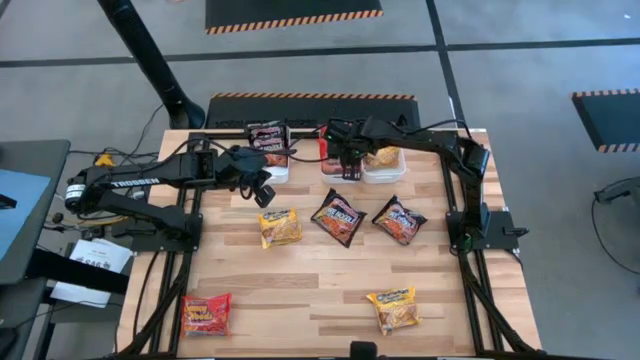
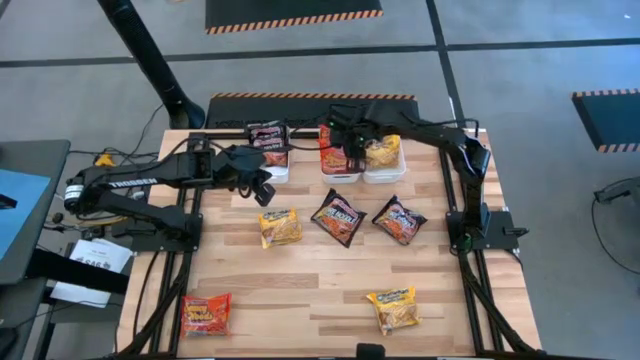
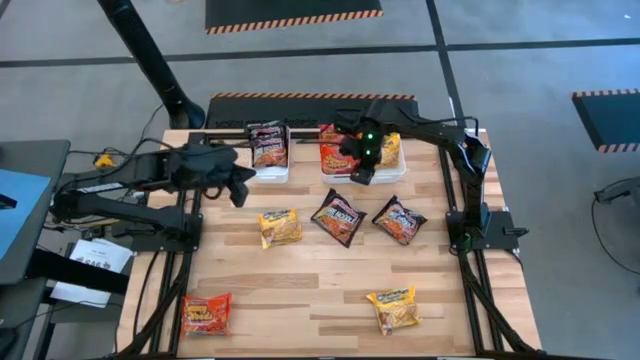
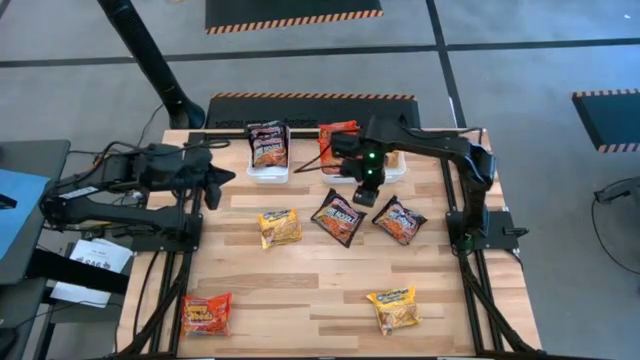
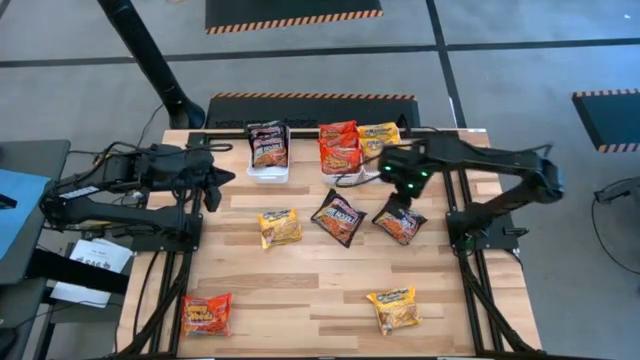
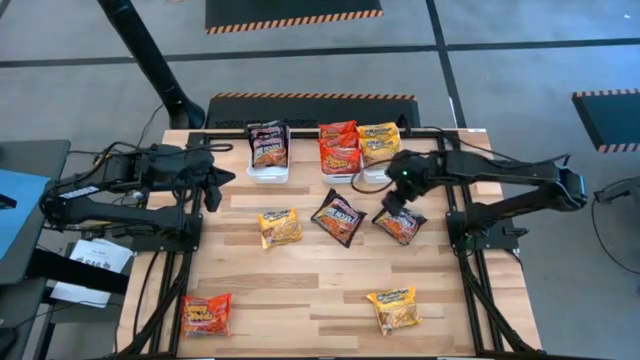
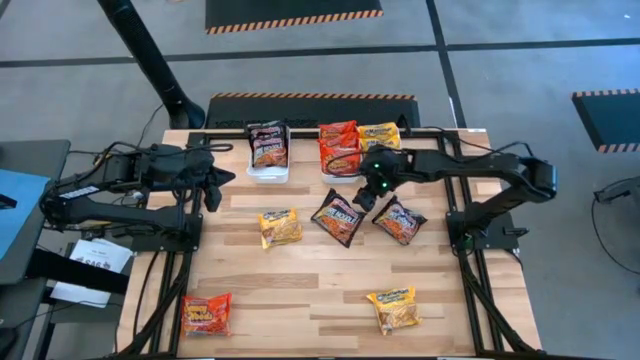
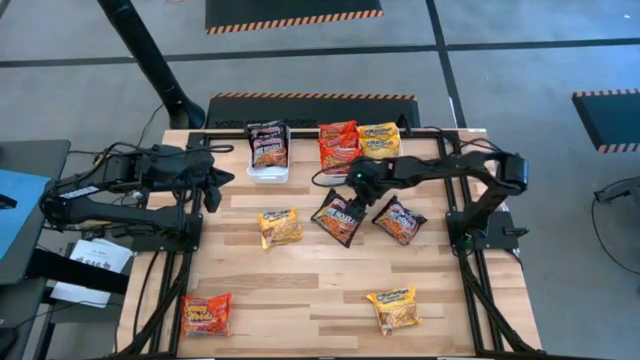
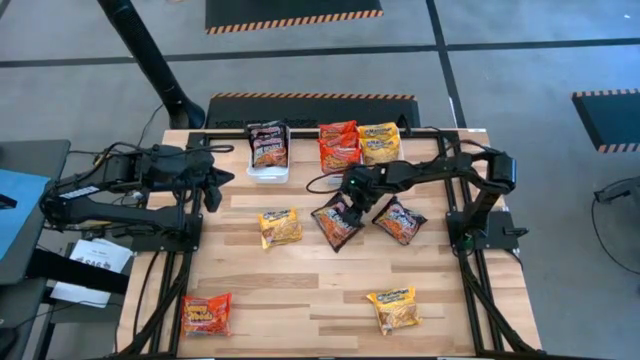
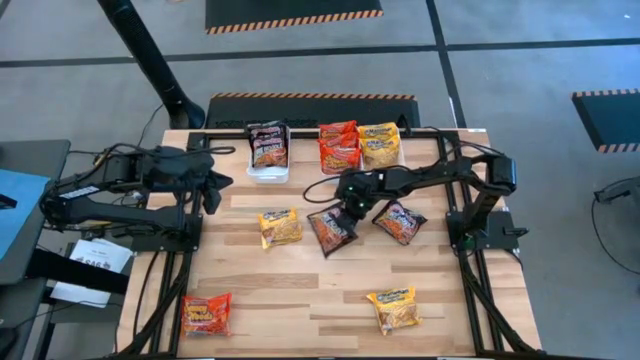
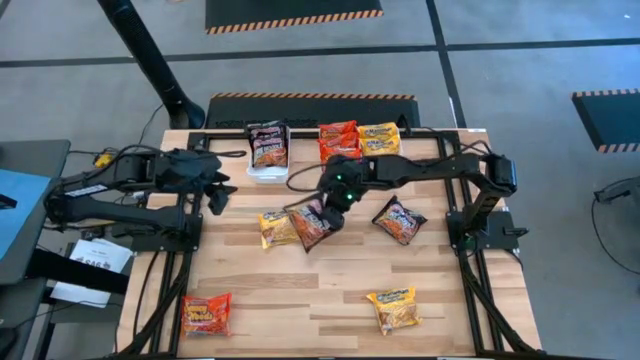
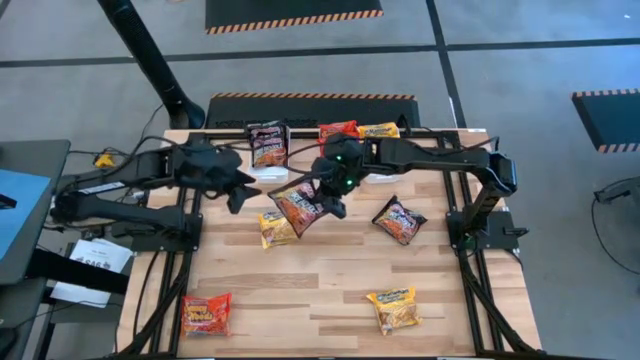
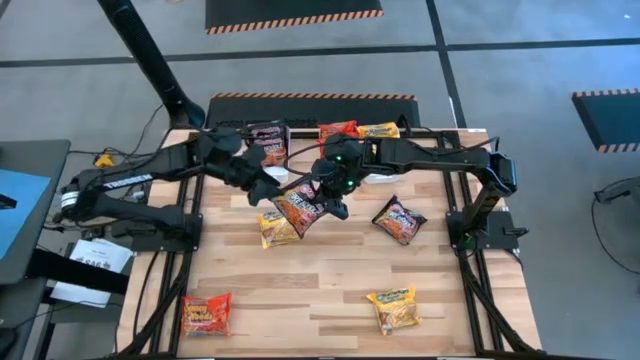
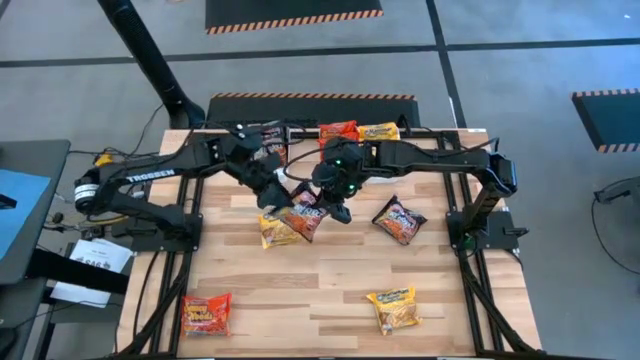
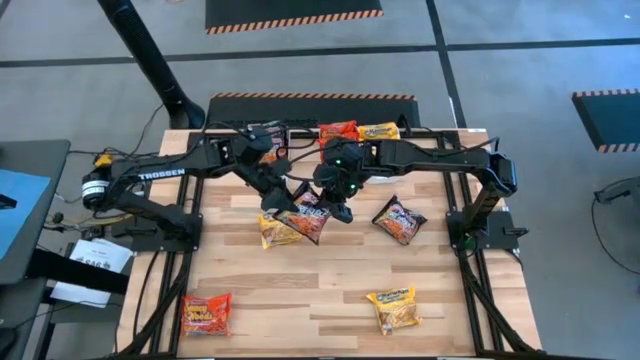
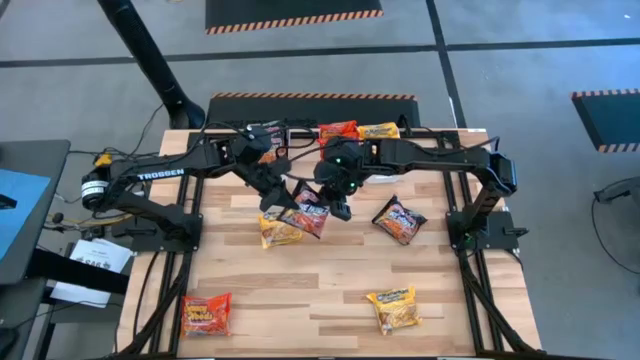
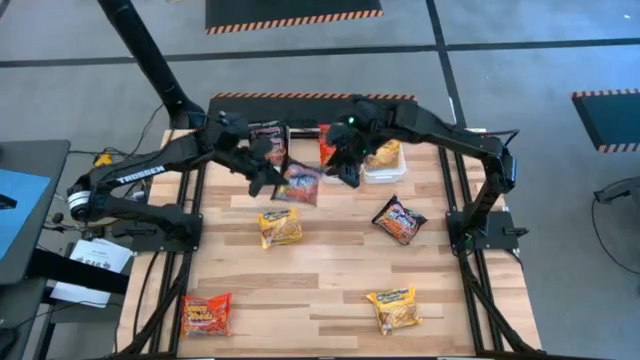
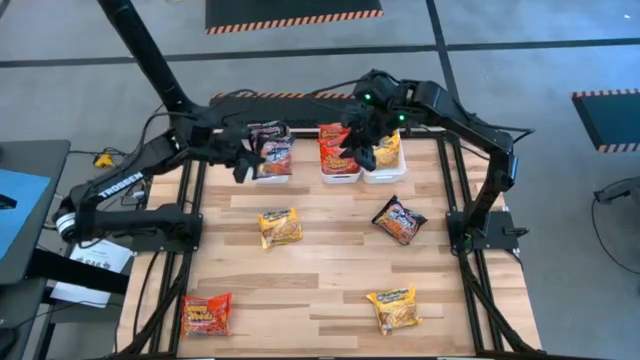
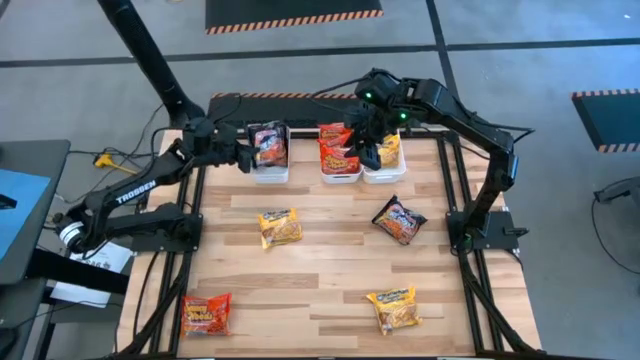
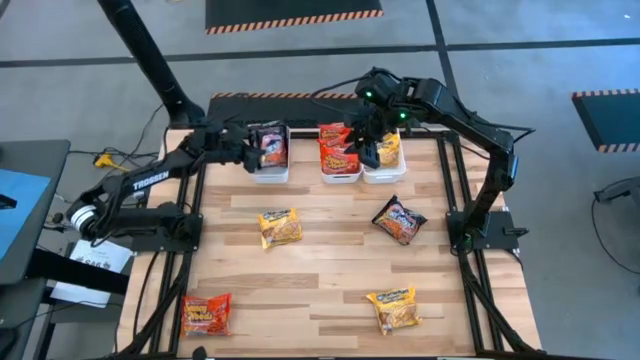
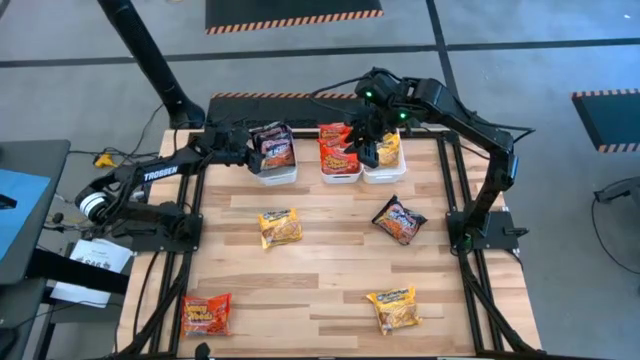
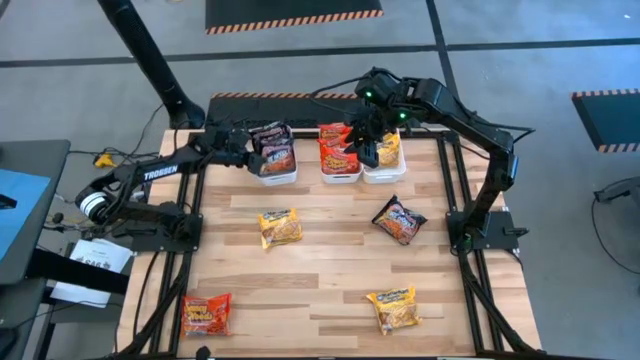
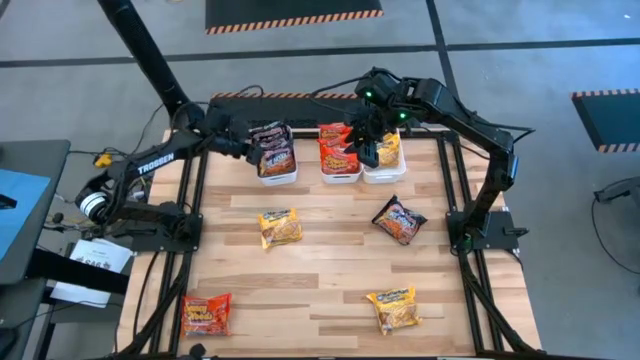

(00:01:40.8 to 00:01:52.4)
Task: Sort Maruchan noodles
Put the black noodle pack into the left white bin

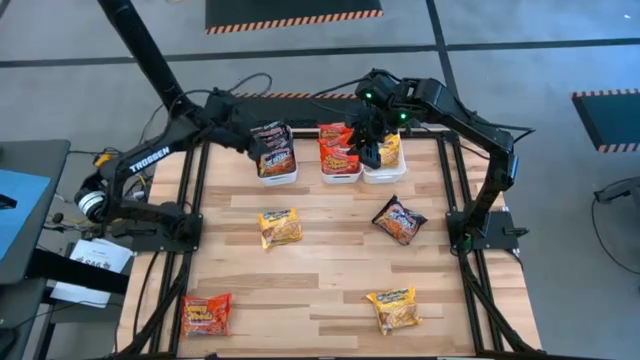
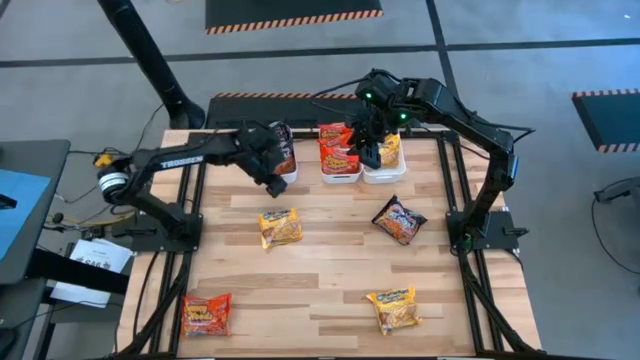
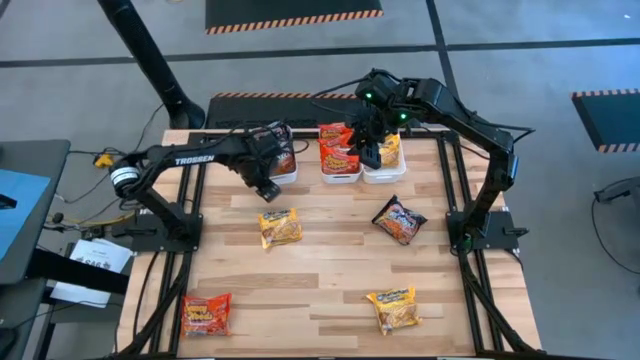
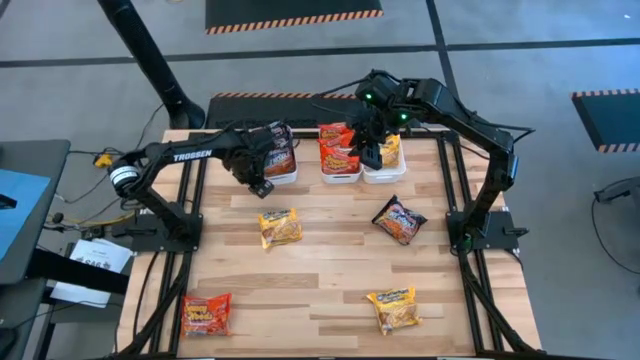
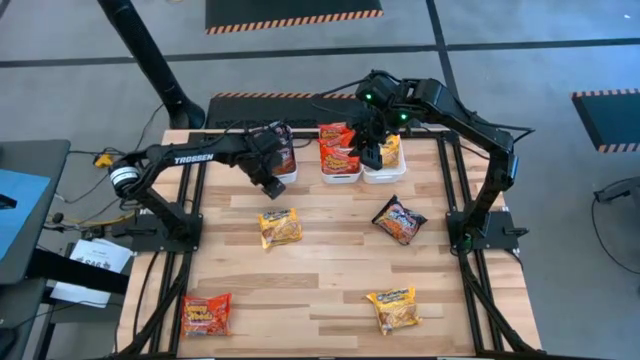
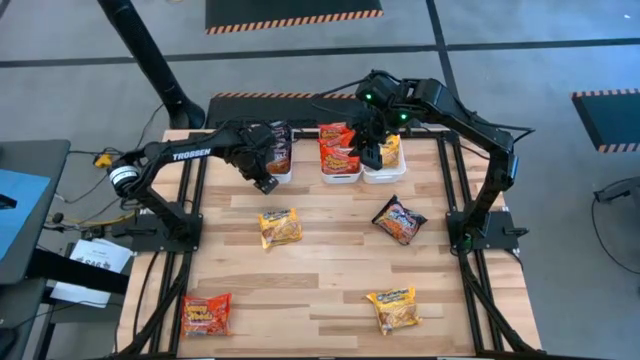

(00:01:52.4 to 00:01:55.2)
Adjust the left white bin on the table

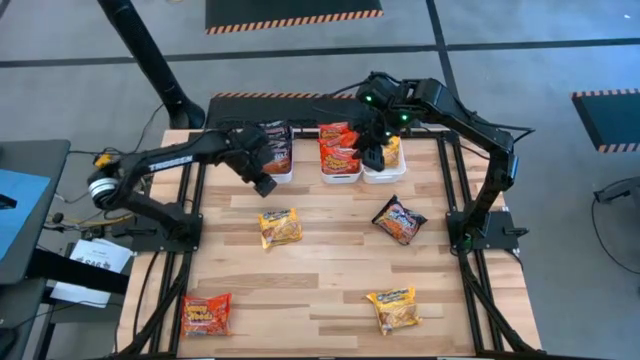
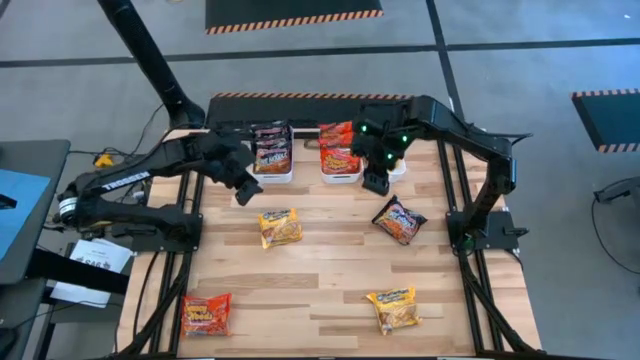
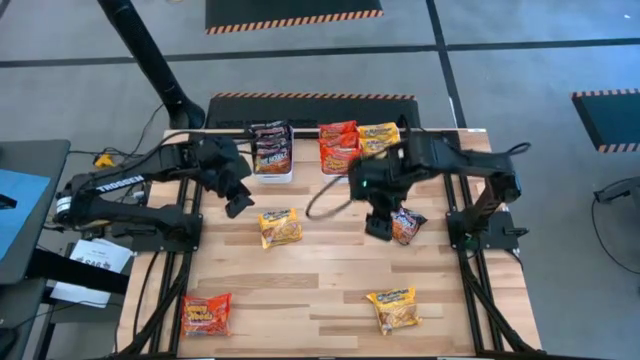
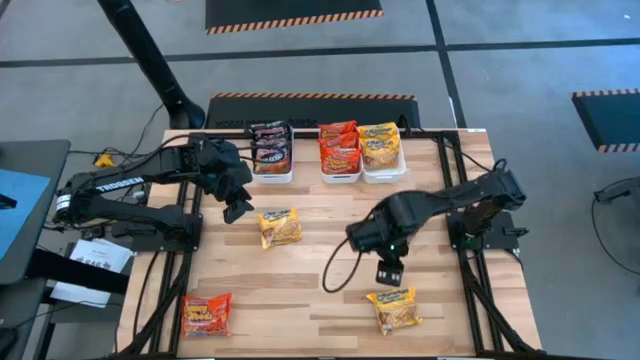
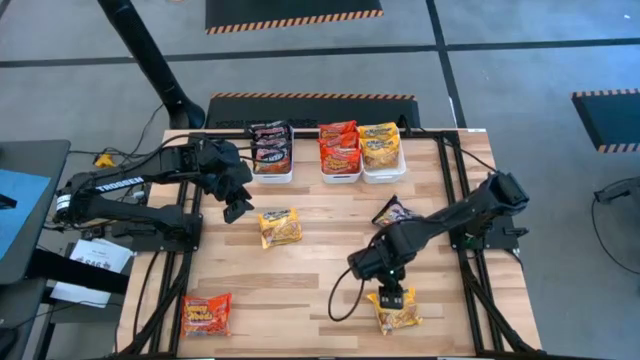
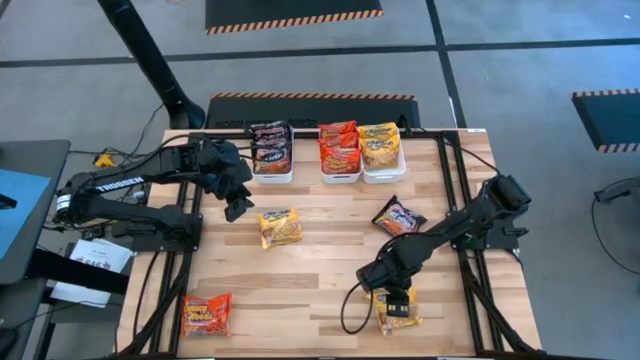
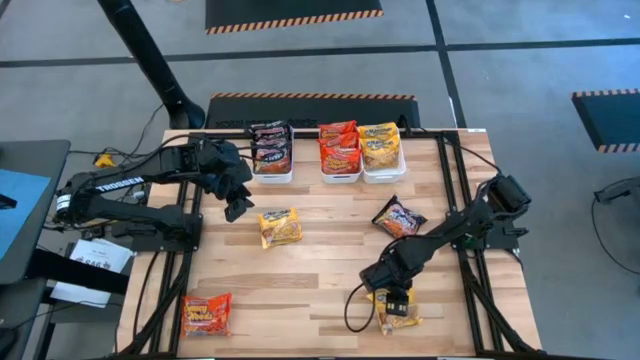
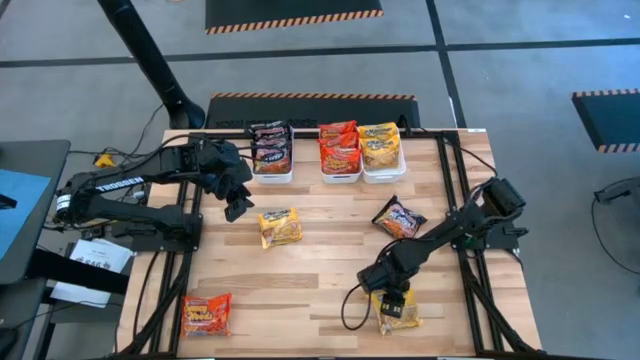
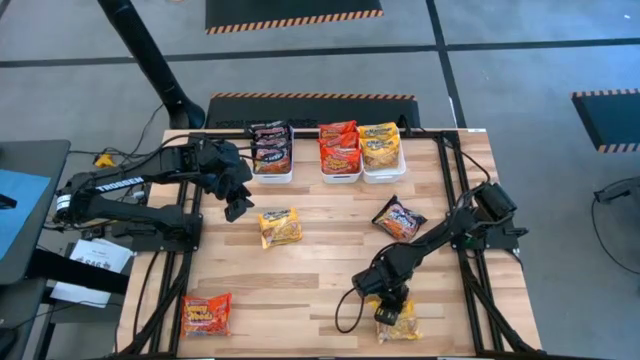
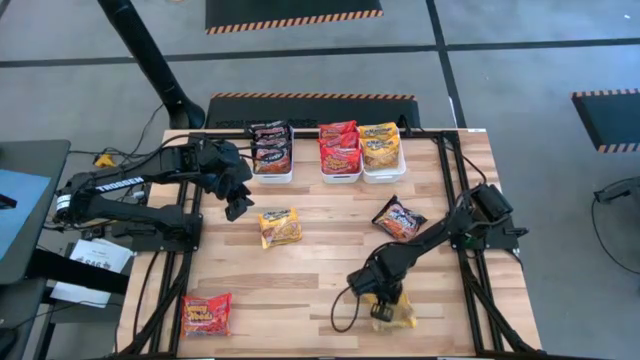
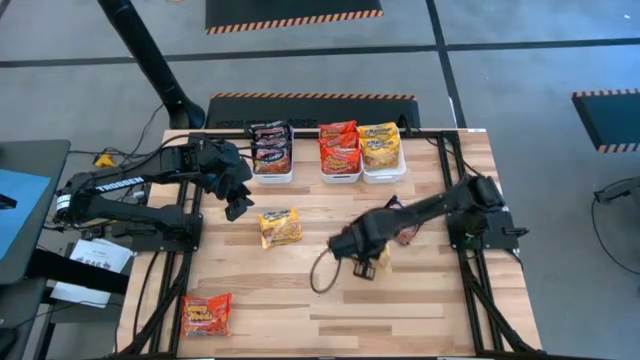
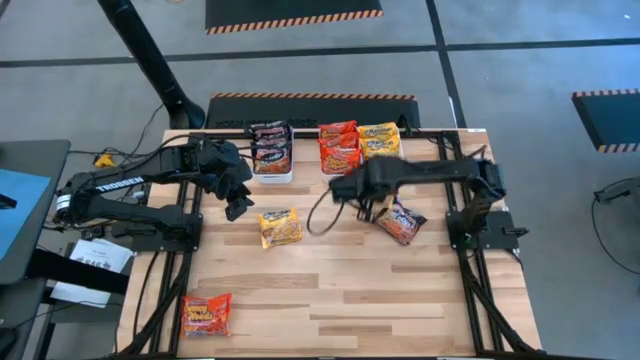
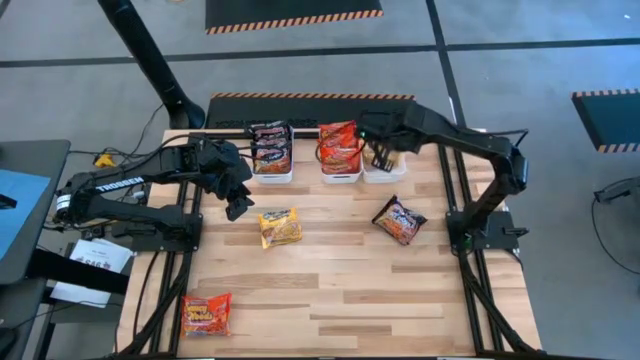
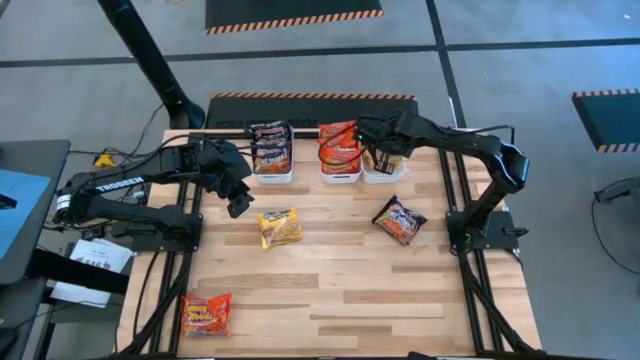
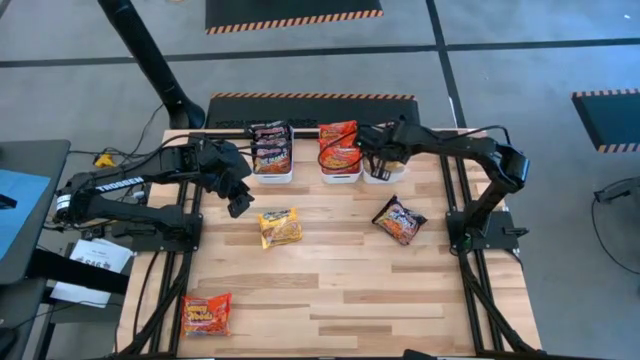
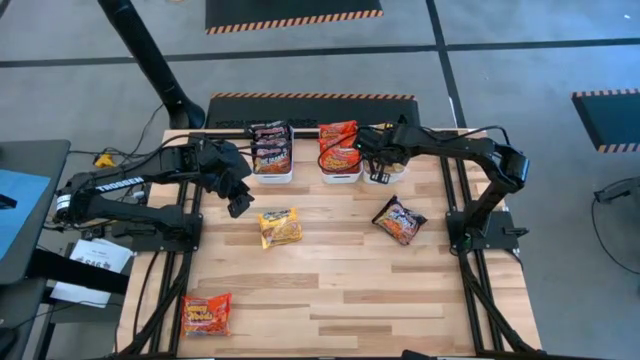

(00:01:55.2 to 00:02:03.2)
Put the yellow noodle pack into the right white bin
